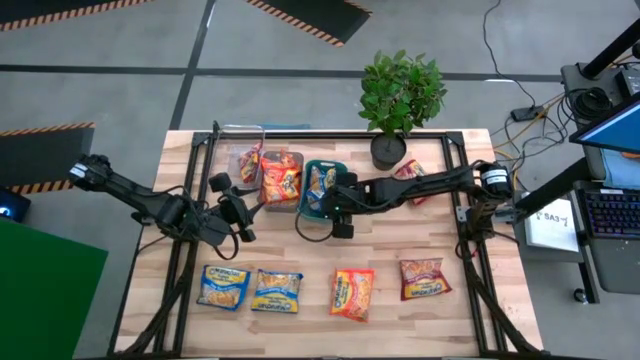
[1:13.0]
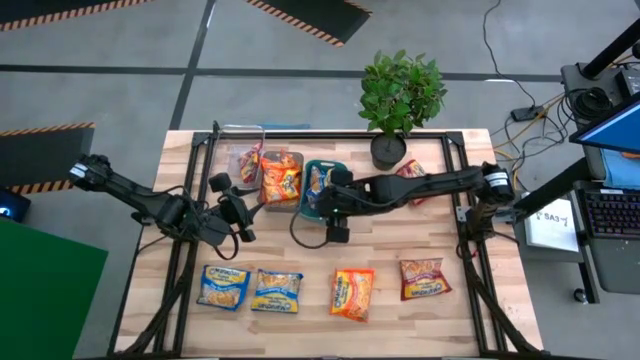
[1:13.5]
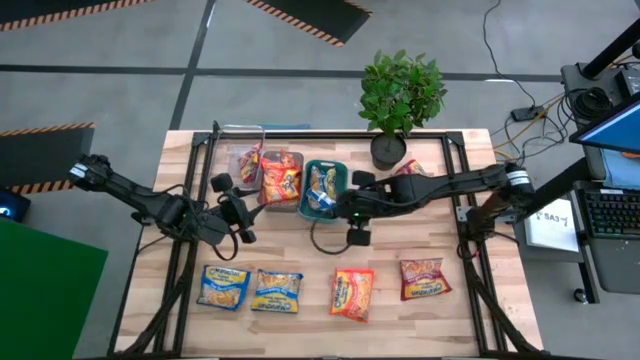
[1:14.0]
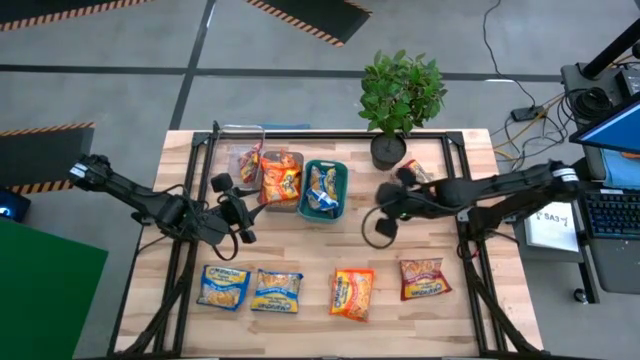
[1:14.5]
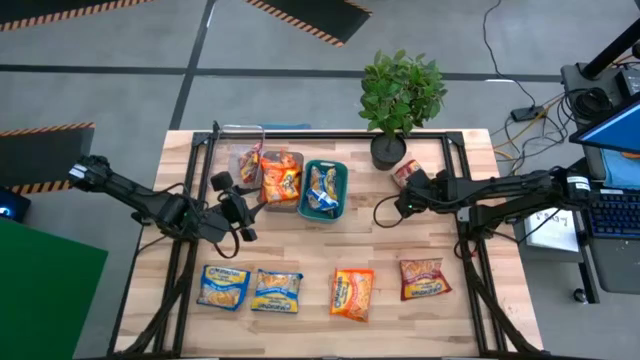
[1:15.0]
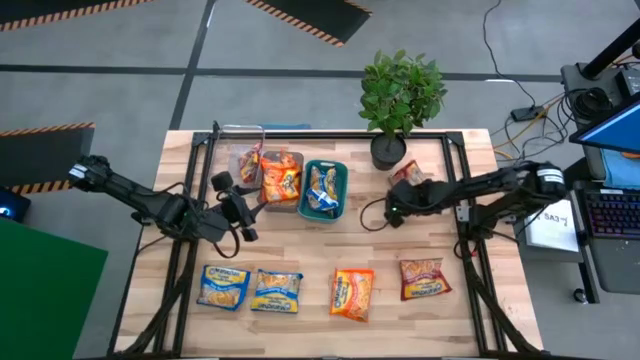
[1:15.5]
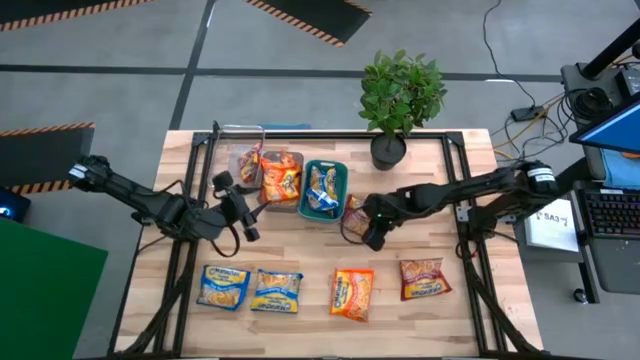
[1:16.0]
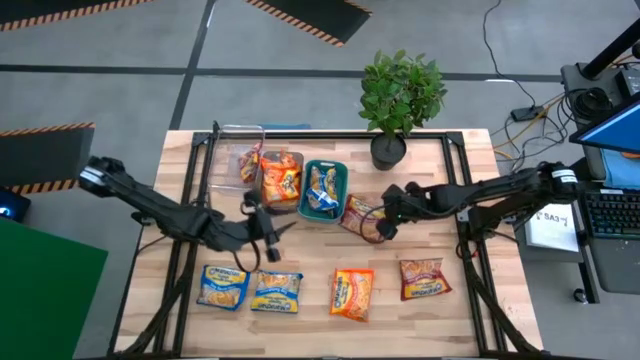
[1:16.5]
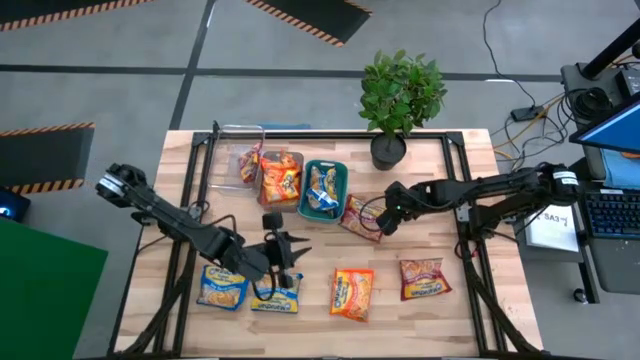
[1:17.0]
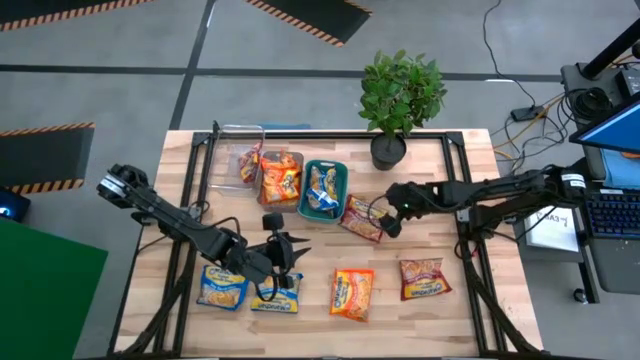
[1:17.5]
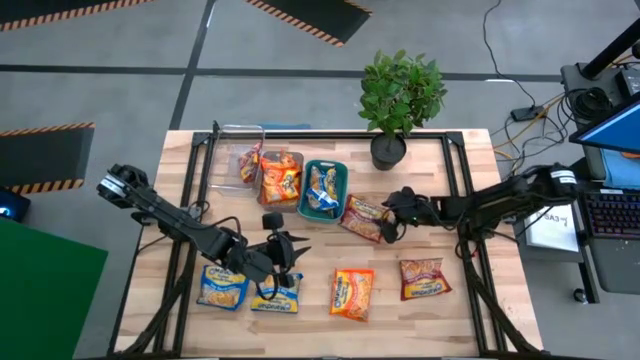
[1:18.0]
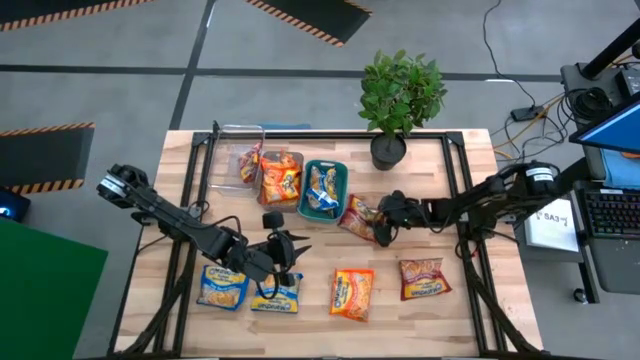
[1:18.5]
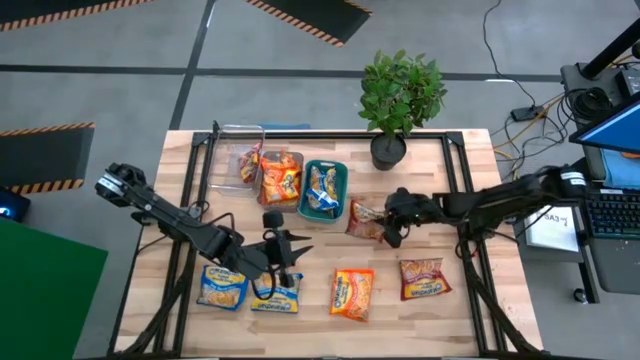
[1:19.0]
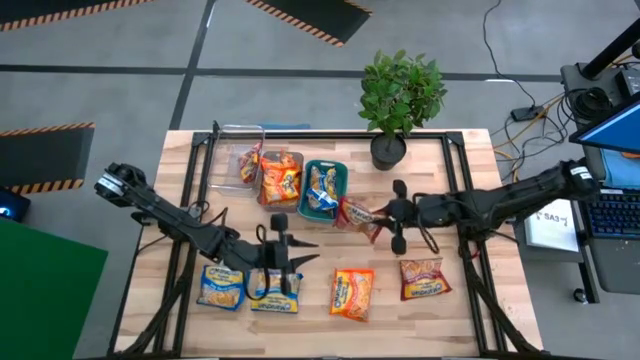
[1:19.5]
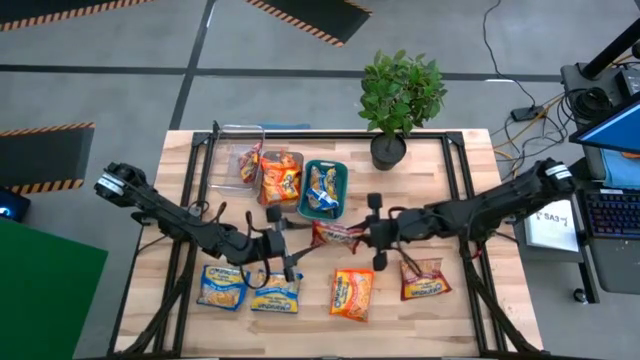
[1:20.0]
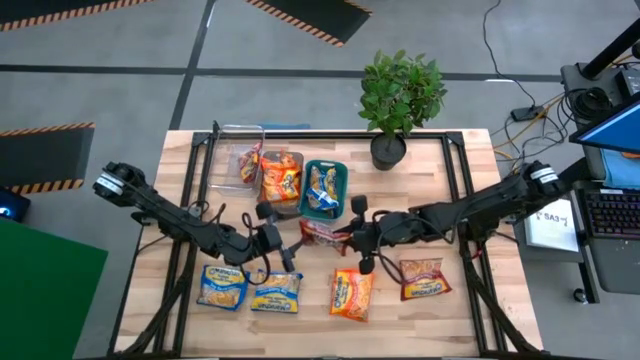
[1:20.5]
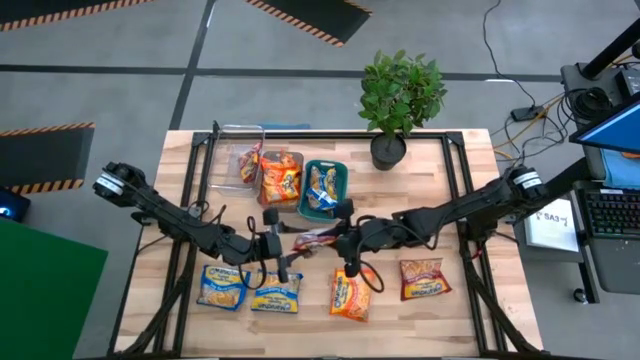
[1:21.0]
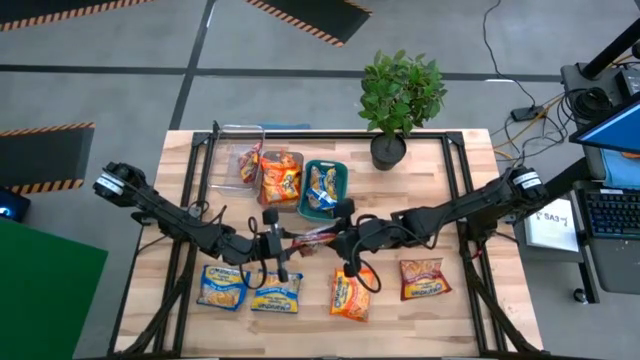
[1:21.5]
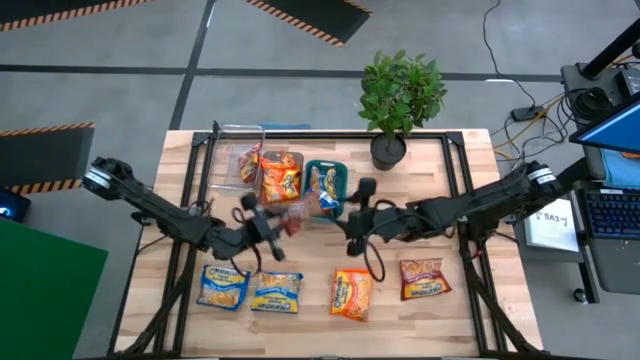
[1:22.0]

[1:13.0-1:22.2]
Task: Sort Maruchan noodles
Put the red noodle pack into the transparent bin

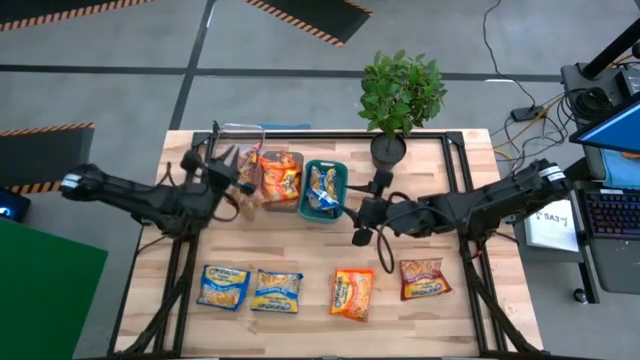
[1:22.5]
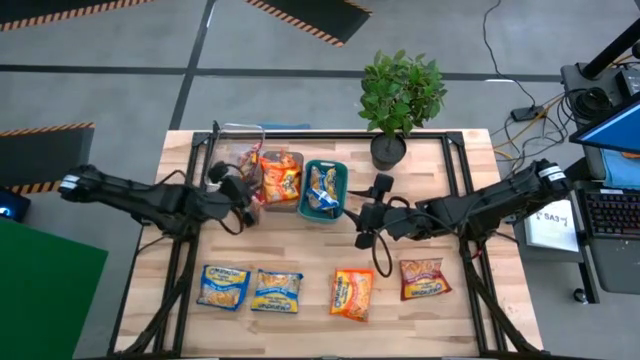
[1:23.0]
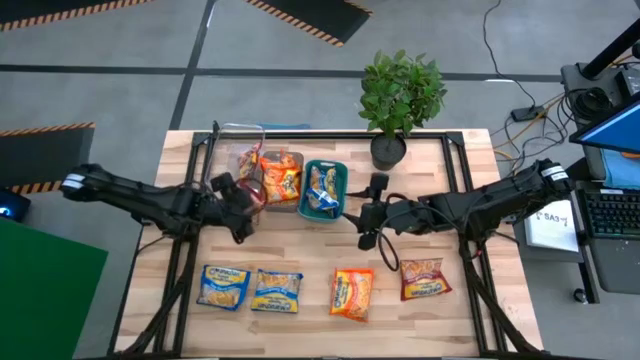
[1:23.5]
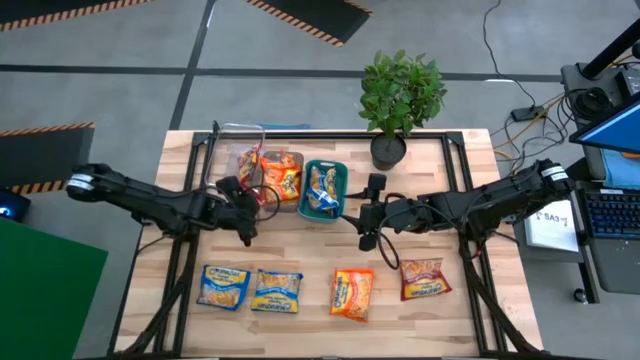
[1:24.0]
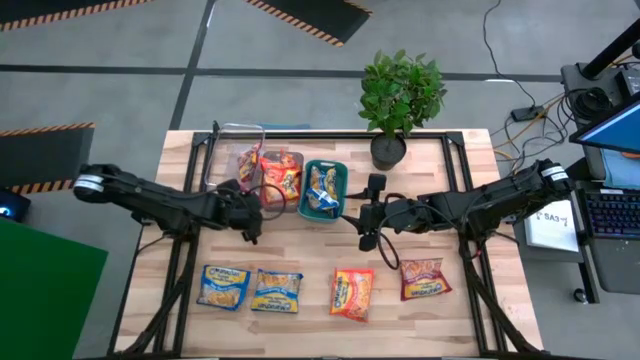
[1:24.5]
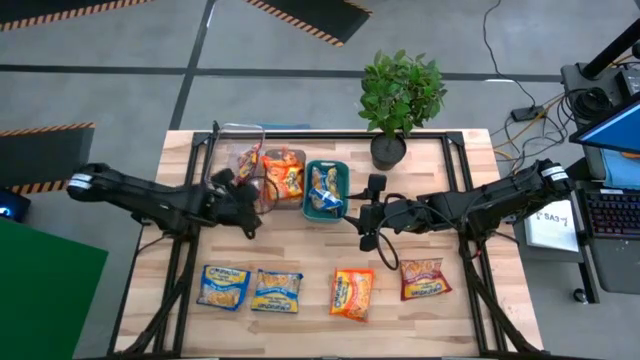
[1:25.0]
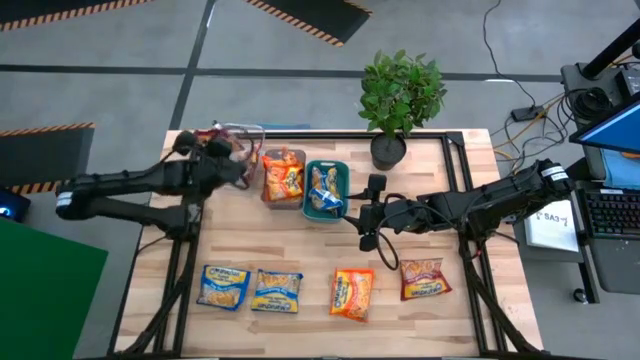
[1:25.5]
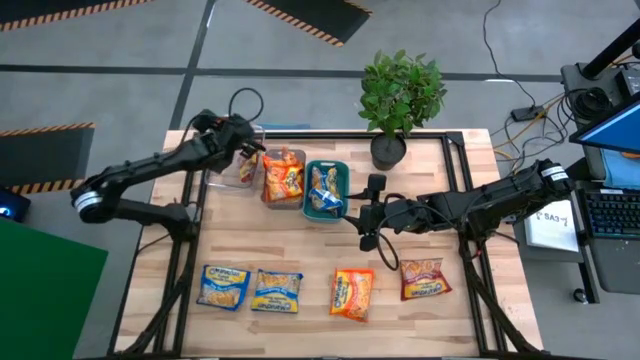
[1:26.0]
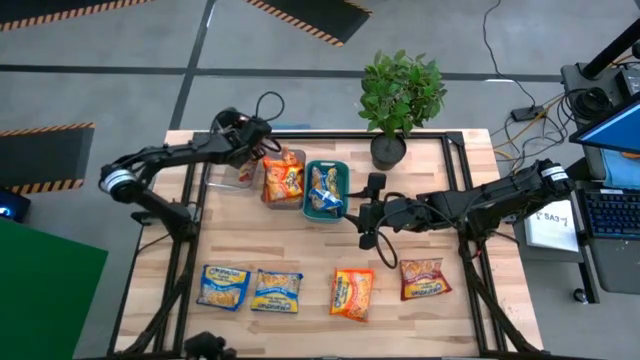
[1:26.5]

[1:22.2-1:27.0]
Put the red noodle pack into the transparent bin

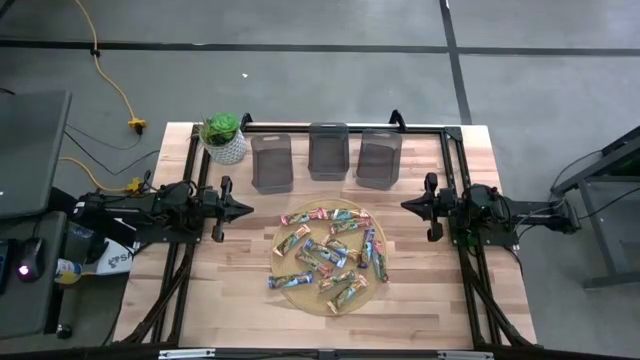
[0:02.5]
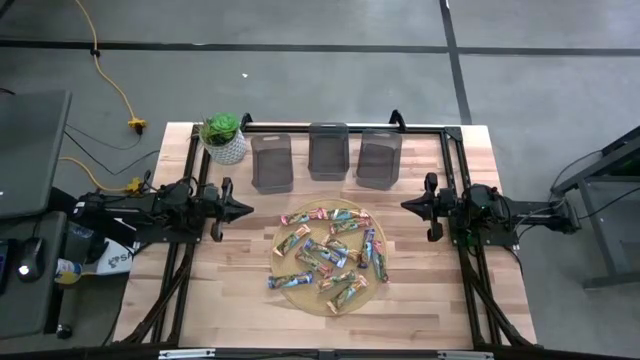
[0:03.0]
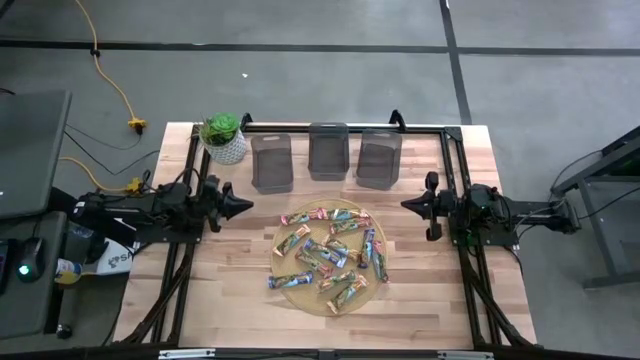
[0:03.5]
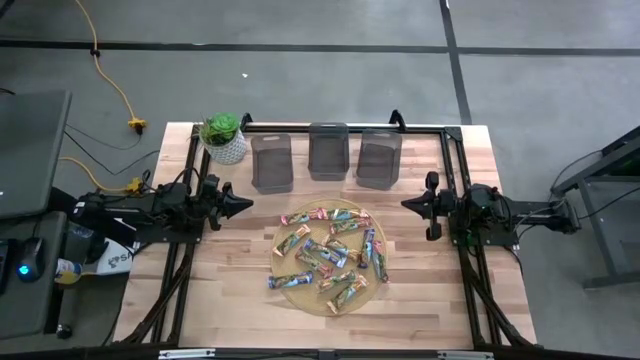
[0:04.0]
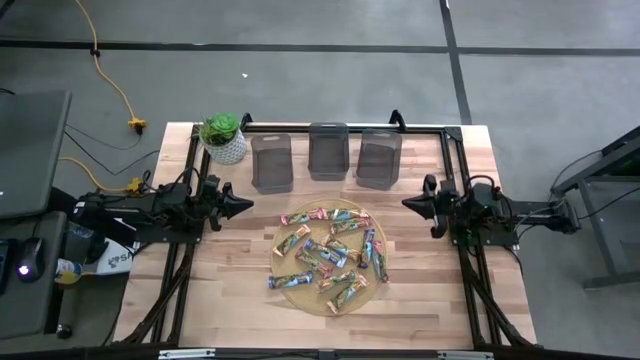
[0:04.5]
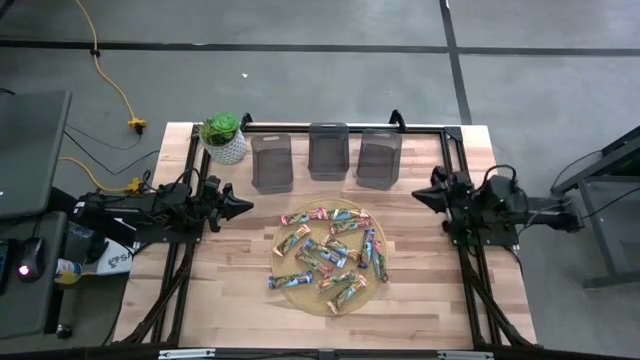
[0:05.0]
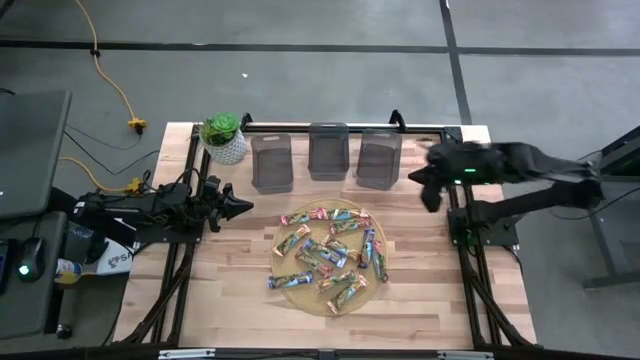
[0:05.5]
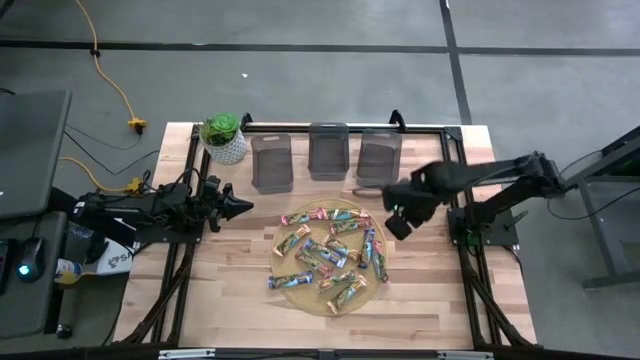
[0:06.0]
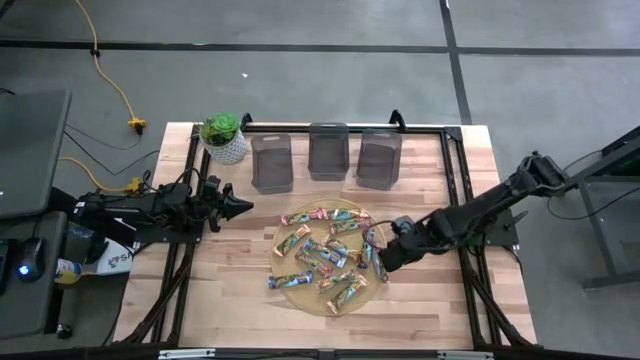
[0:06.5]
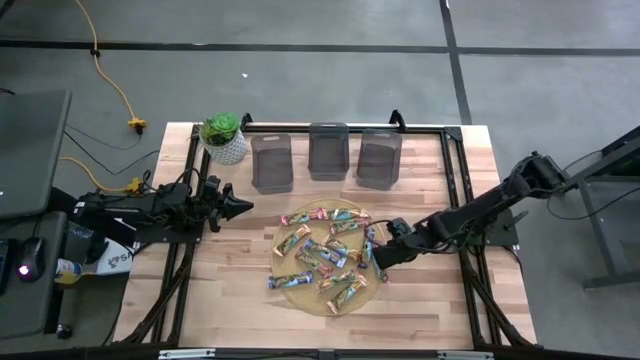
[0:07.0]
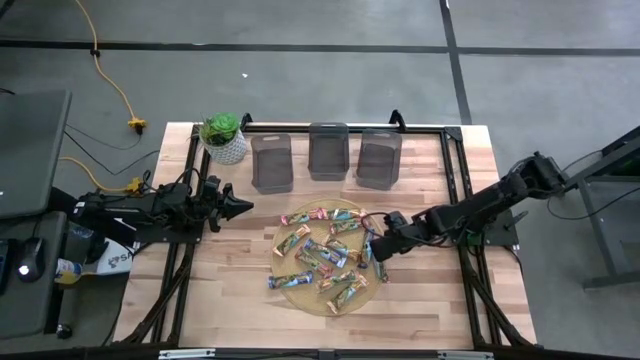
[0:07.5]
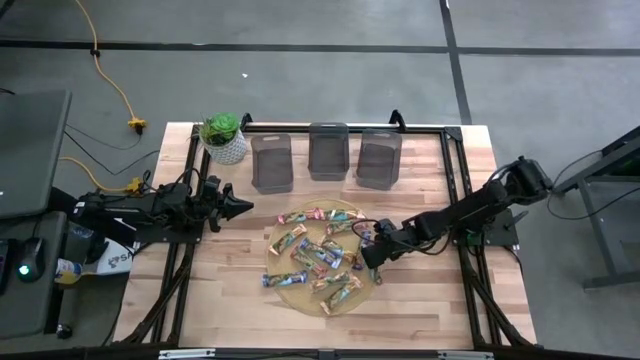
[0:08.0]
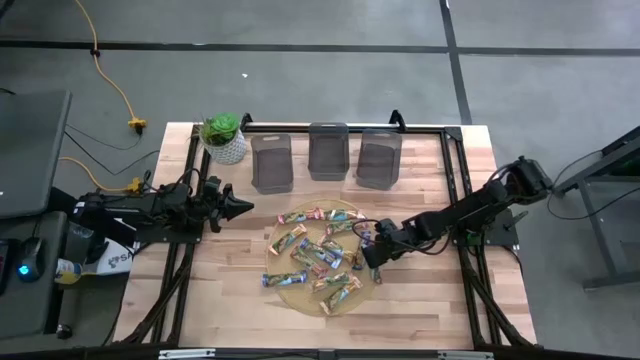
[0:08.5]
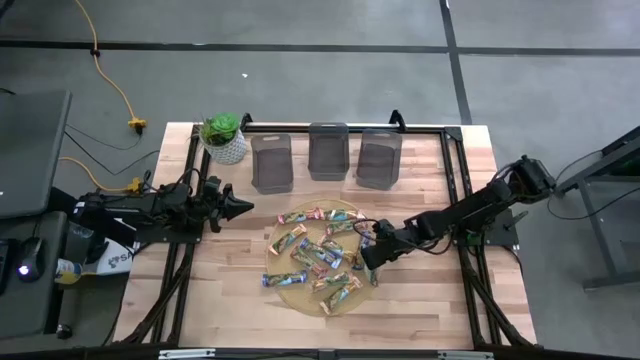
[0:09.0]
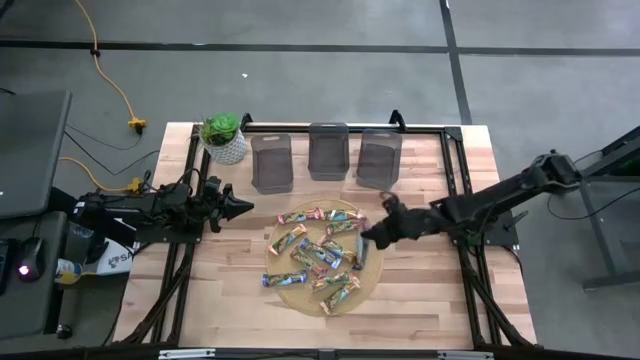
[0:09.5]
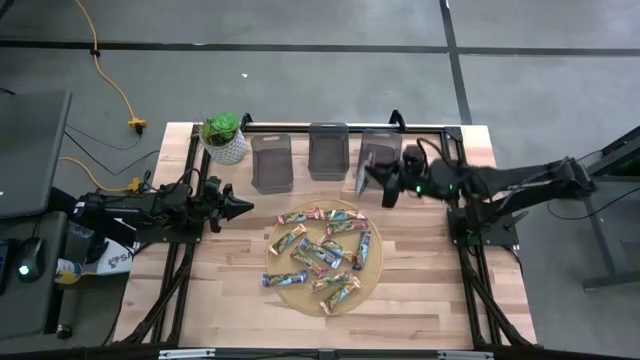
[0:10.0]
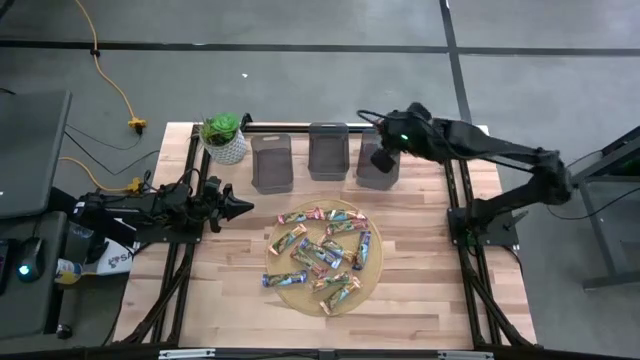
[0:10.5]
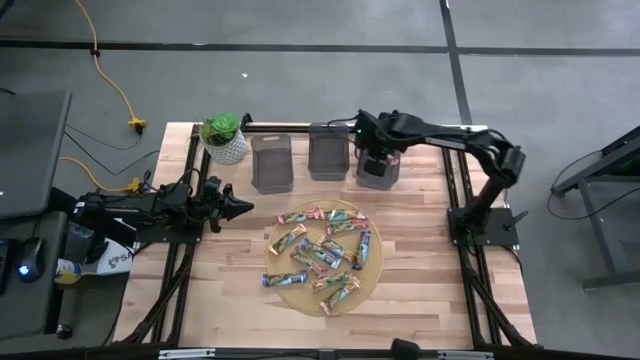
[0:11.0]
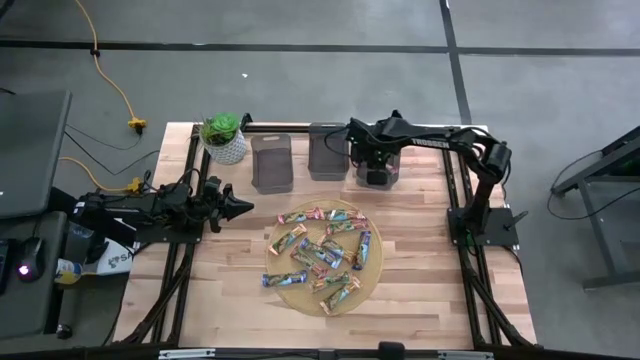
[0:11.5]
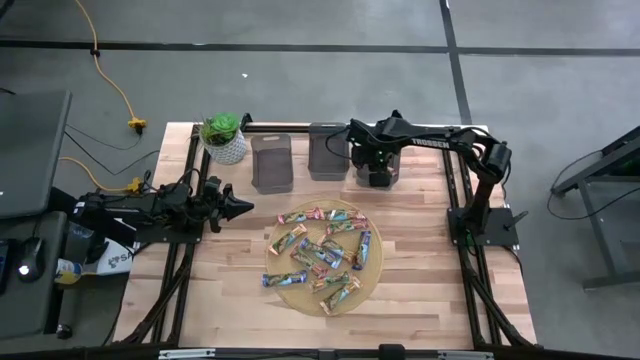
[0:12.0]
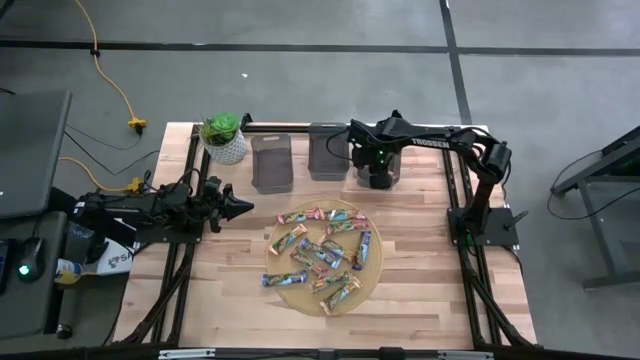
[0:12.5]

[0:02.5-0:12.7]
Task: Pick and place Granola Bars by type
Put the orange granola bar into the right black bin
